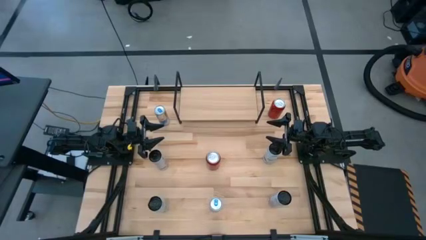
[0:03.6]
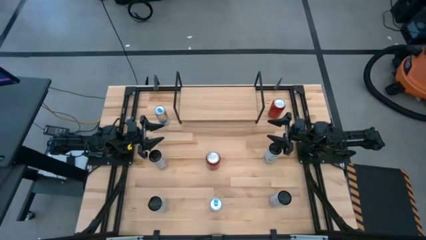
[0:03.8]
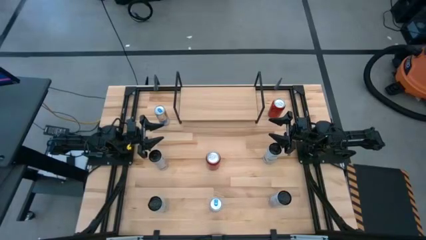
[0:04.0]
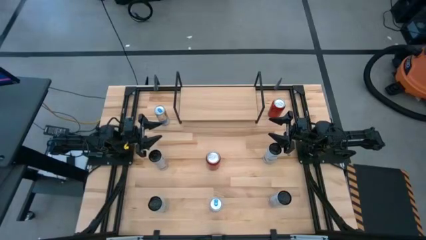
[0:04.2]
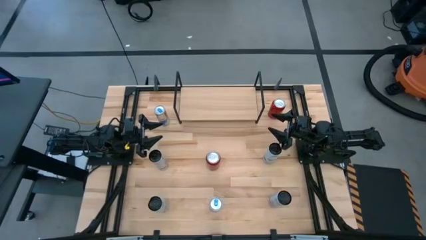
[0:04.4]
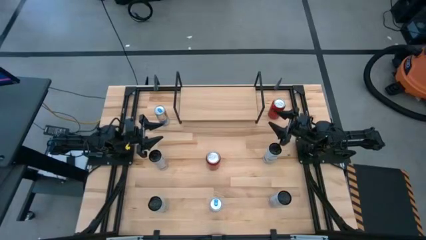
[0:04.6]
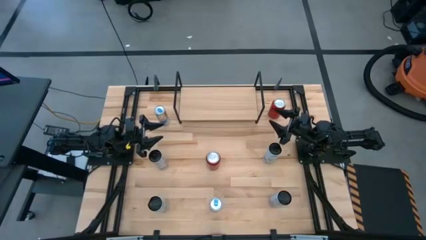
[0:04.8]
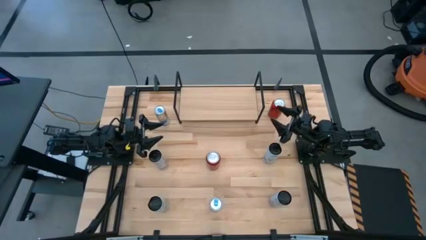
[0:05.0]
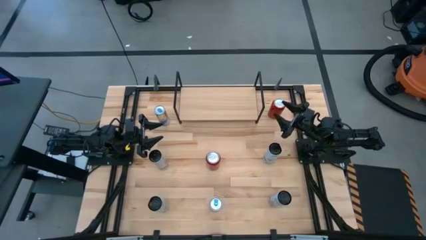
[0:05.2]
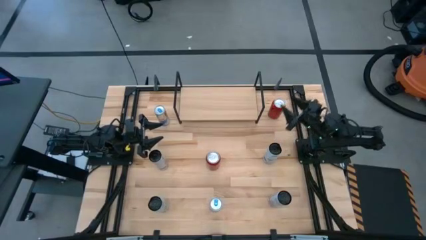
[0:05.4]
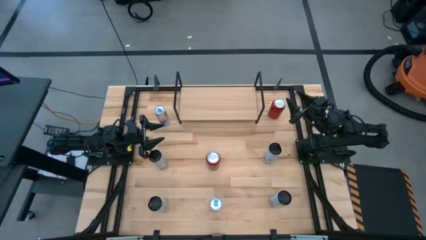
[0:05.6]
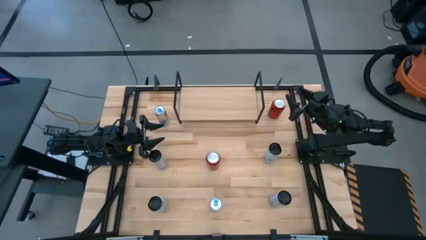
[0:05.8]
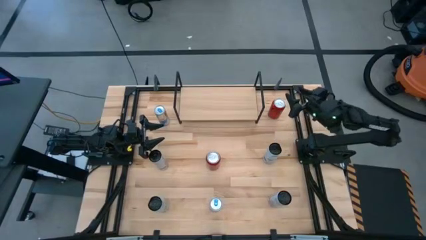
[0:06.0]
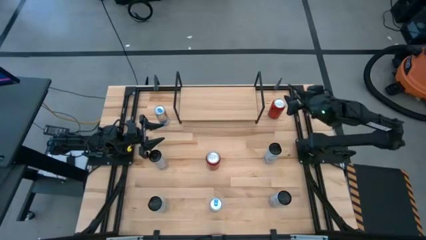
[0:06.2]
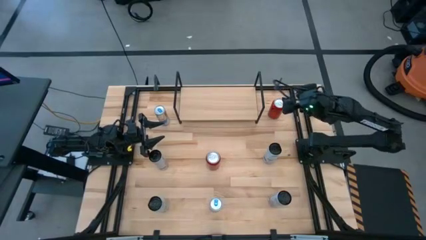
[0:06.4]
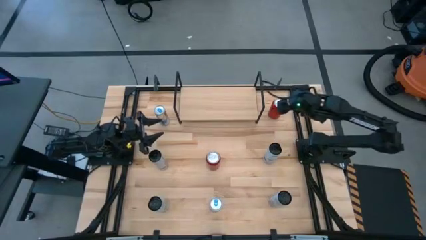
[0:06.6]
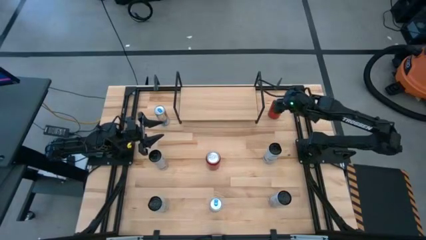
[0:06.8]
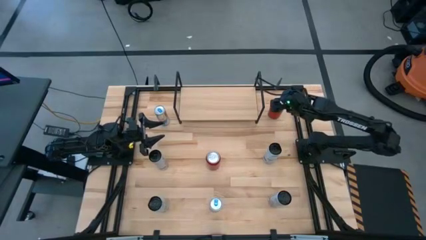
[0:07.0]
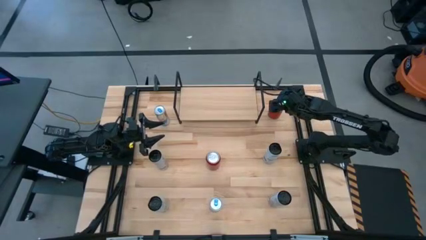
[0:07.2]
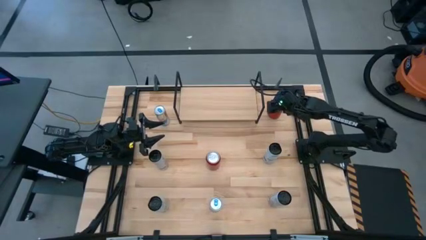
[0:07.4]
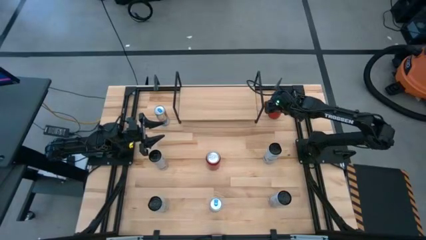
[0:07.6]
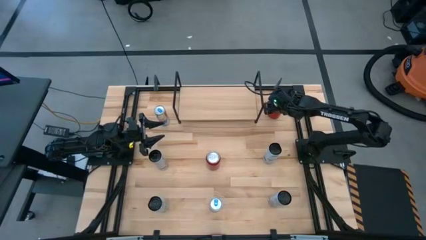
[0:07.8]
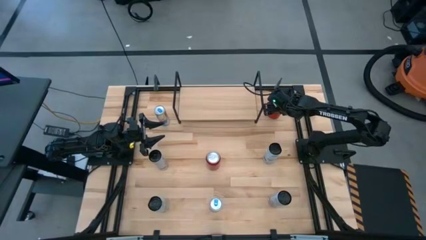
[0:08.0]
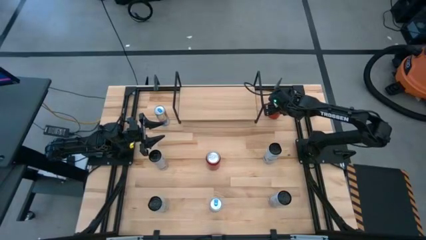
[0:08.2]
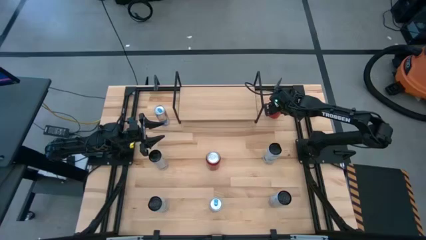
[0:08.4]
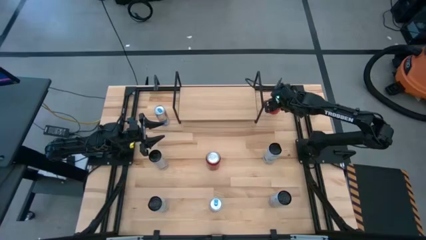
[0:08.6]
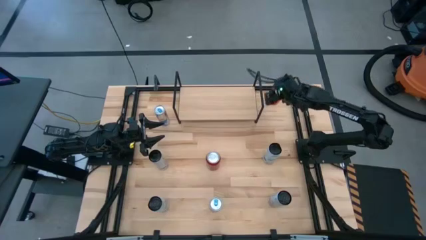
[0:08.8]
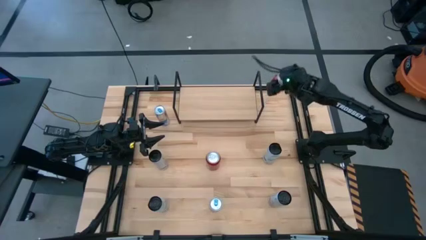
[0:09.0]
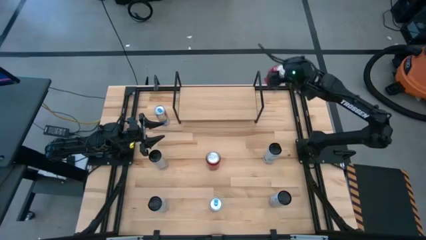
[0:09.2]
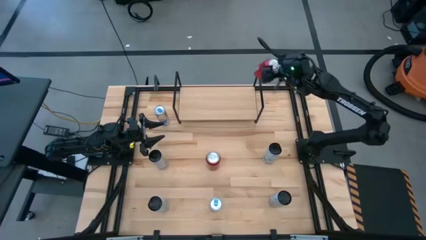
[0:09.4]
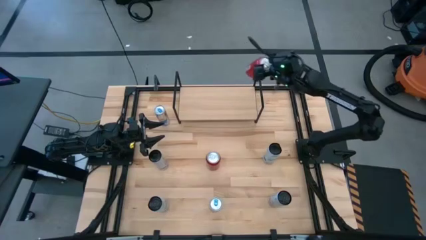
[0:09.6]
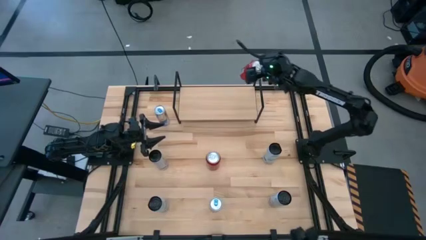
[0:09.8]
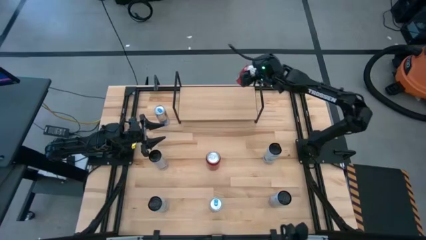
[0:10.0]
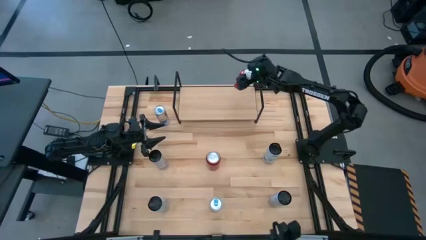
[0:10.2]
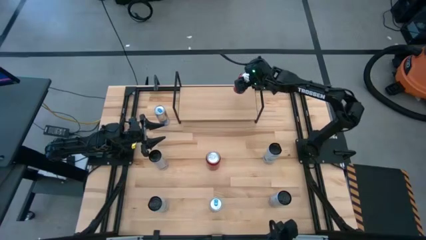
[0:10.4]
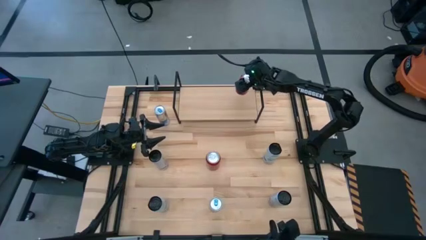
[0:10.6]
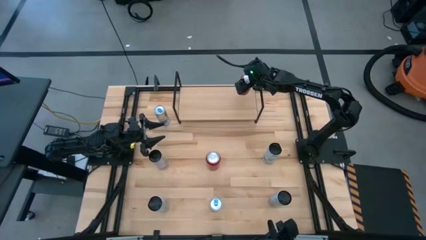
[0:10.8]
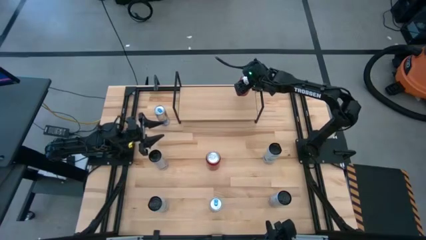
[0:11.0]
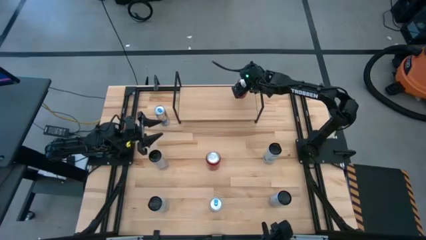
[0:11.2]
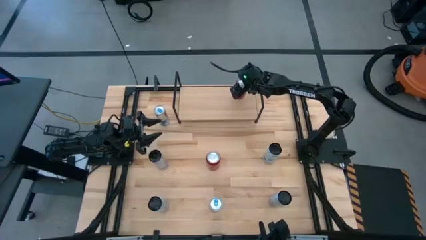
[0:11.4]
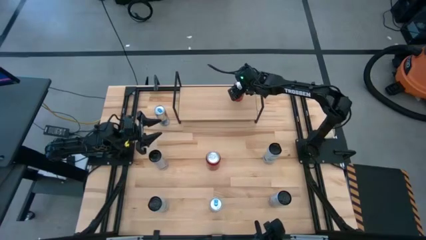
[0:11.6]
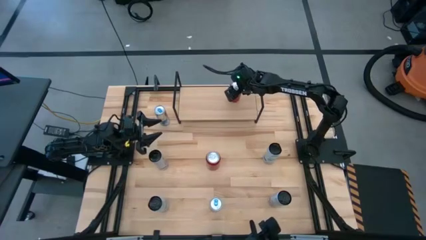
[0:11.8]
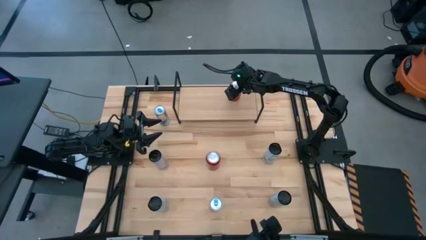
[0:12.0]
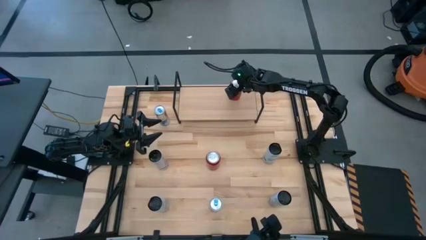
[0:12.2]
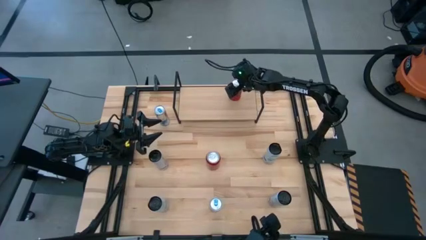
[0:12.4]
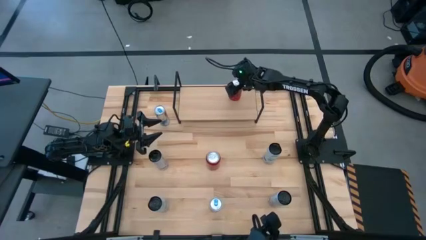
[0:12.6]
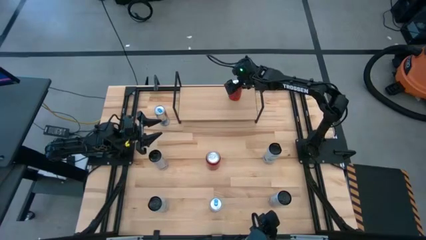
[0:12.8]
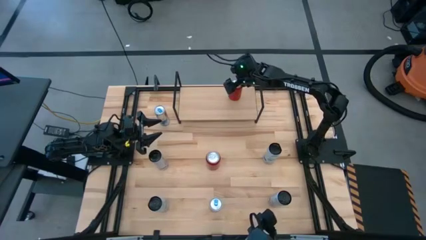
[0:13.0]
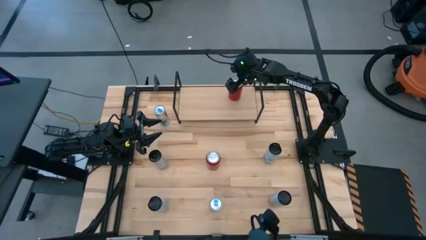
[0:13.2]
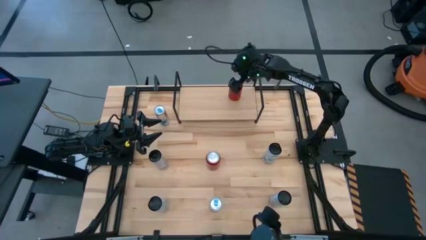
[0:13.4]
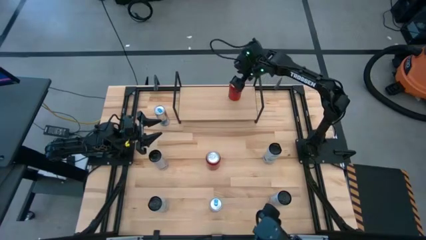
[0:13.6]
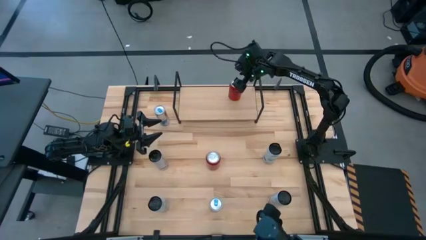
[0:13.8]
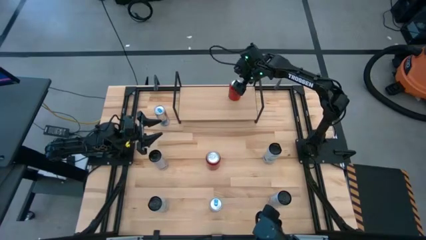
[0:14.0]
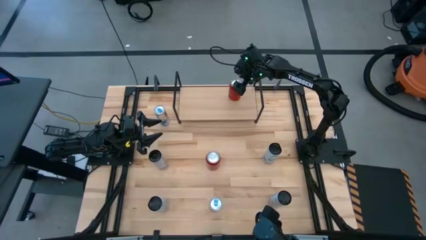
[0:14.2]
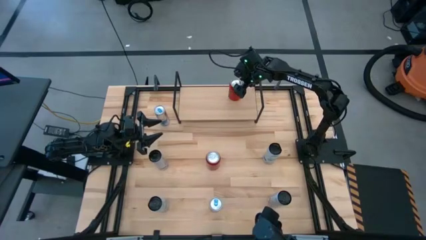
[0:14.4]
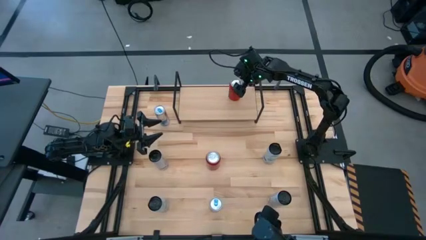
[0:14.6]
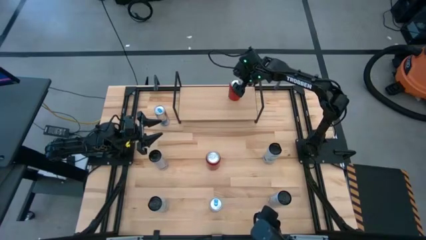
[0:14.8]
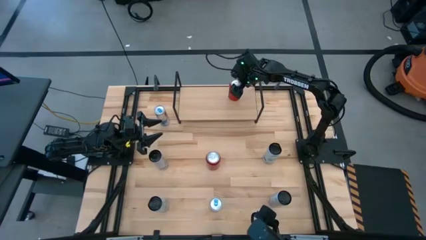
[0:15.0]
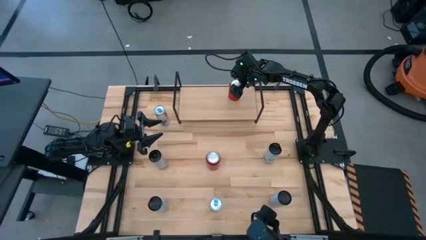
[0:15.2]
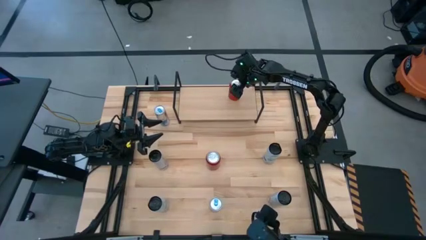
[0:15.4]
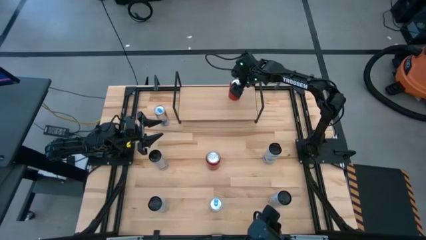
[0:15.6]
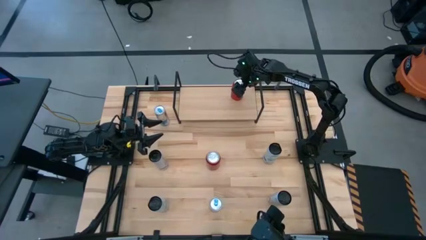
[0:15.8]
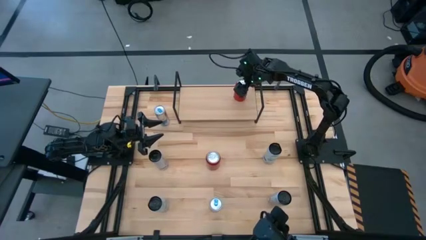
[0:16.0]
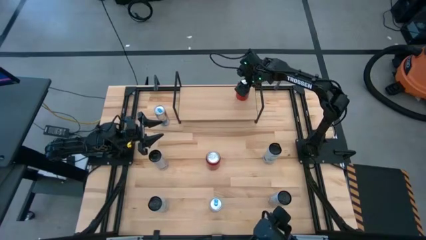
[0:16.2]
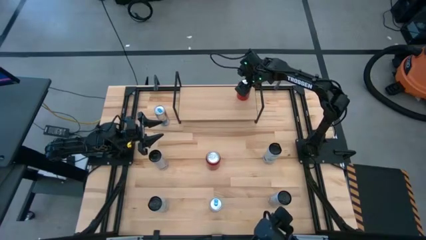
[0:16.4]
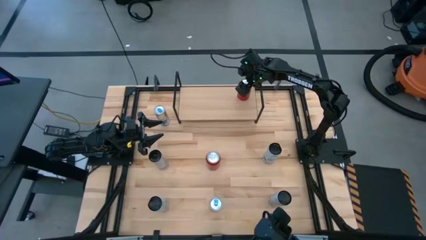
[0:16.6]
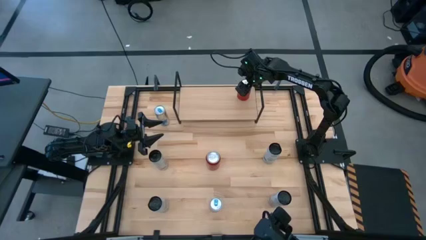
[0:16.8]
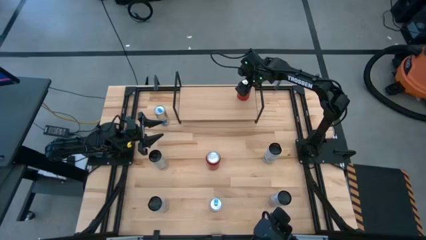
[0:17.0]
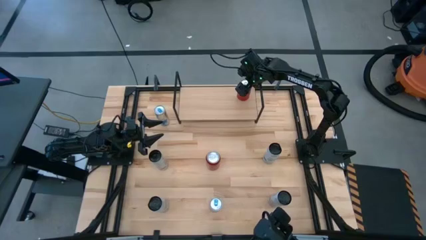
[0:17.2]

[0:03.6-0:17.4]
Task: Place canned beverage on shelf
Put the top red soda can on the shelf
